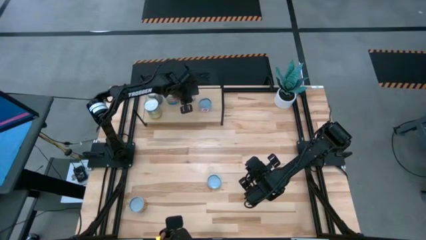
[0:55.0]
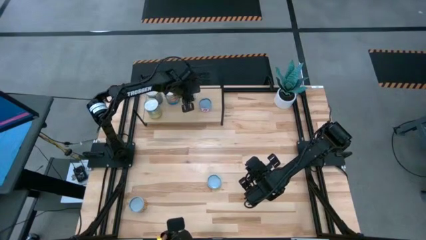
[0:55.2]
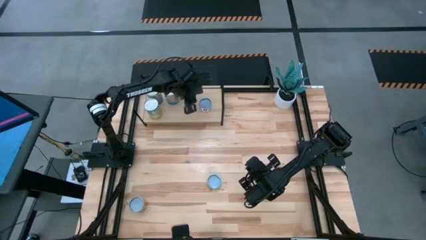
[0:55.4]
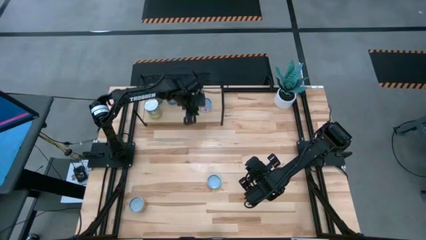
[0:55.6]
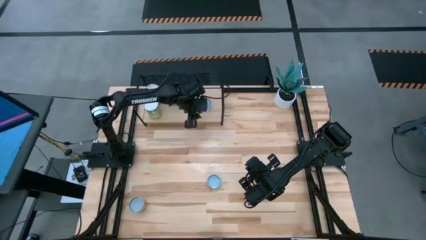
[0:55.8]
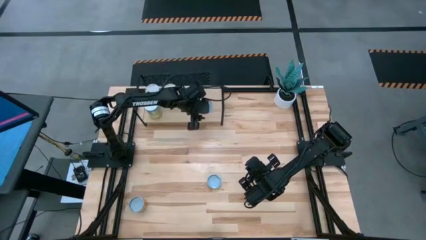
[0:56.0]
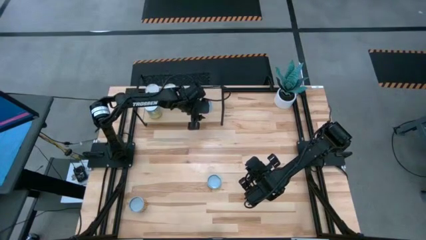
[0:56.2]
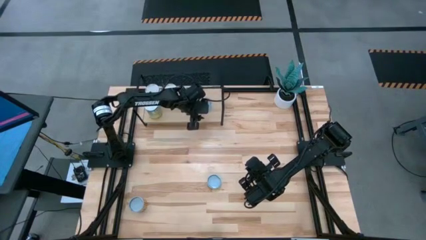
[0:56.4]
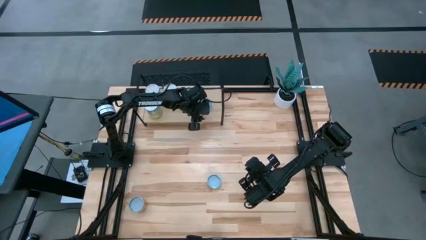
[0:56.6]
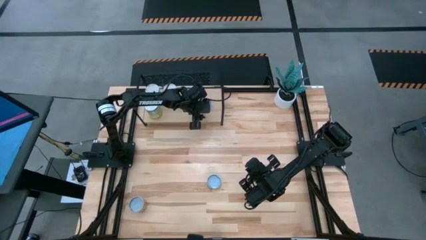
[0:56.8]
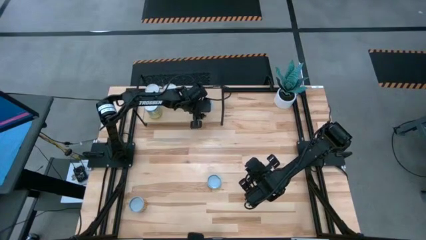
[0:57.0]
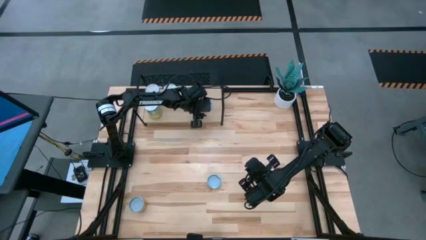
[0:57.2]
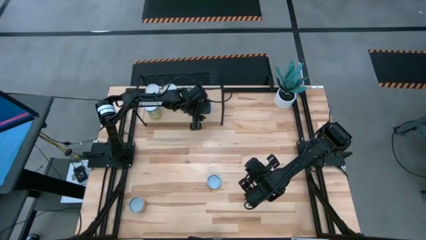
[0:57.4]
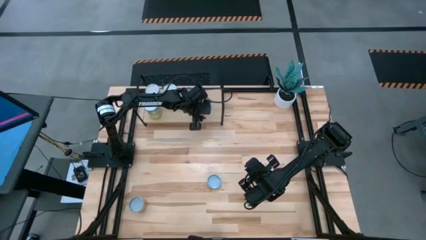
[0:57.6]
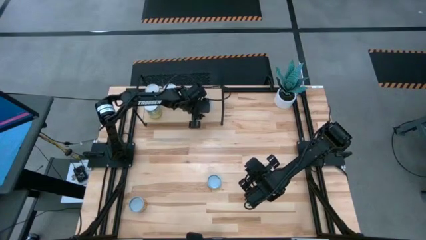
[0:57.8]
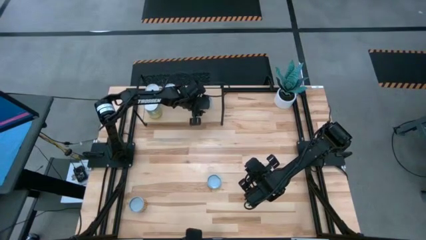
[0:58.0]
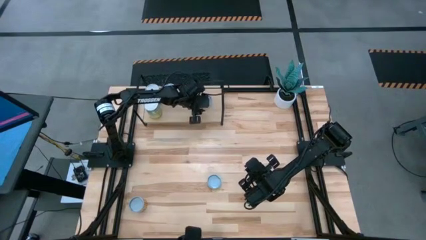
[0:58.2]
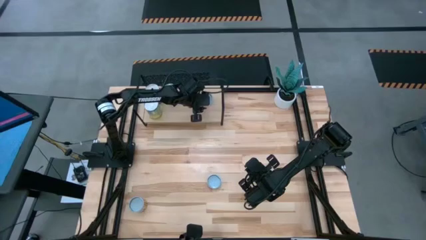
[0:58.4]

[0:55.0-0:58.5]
Task: Pick and place cans onto a shelf
Adjust the tuna can on the shelf

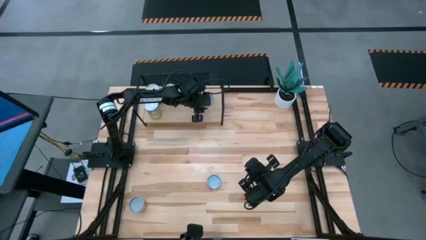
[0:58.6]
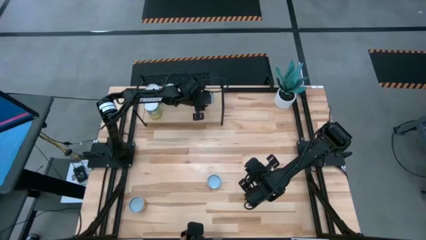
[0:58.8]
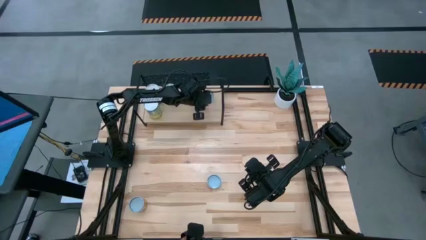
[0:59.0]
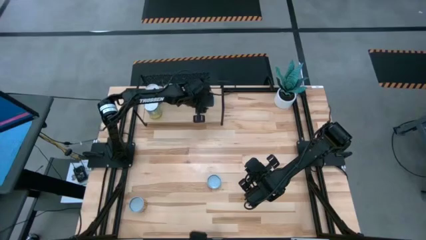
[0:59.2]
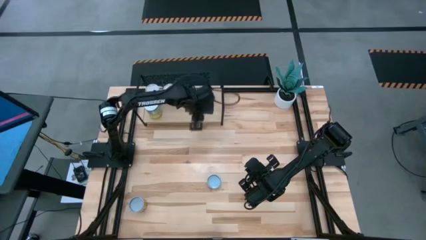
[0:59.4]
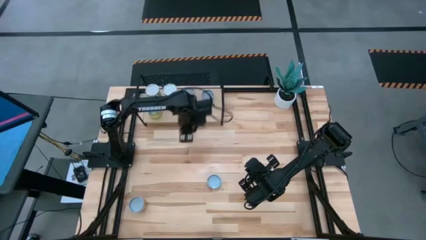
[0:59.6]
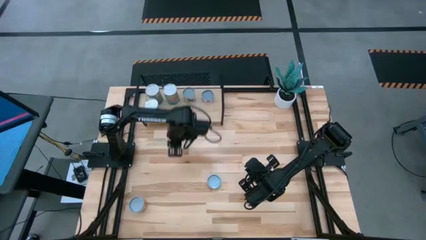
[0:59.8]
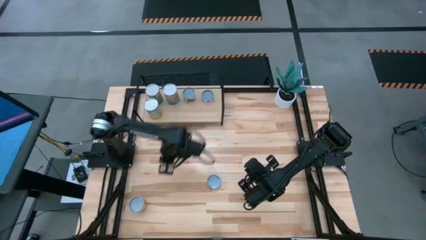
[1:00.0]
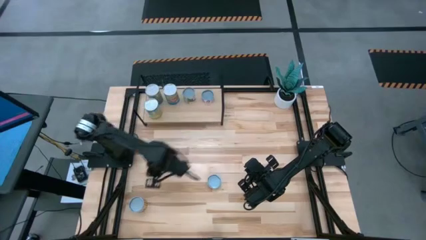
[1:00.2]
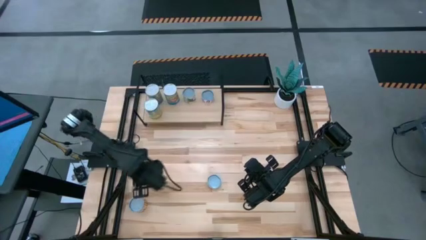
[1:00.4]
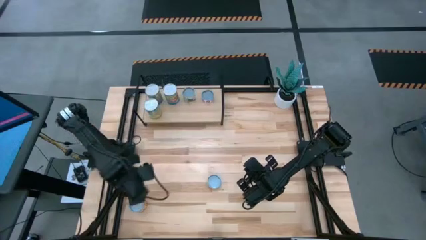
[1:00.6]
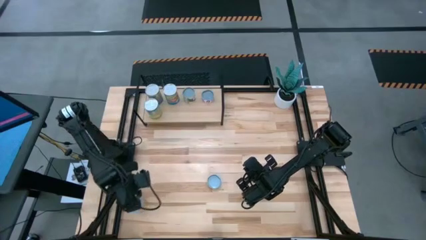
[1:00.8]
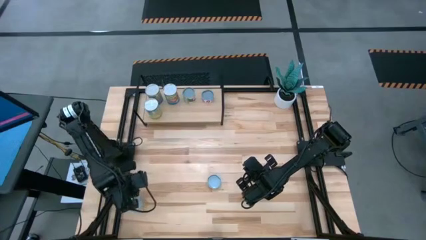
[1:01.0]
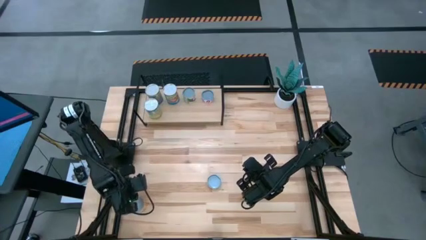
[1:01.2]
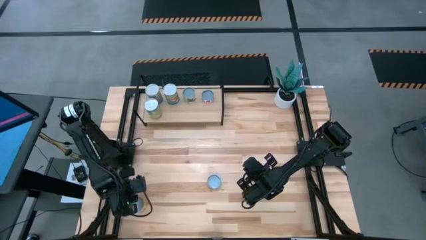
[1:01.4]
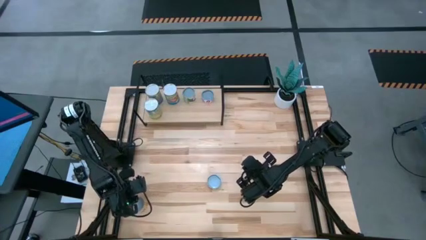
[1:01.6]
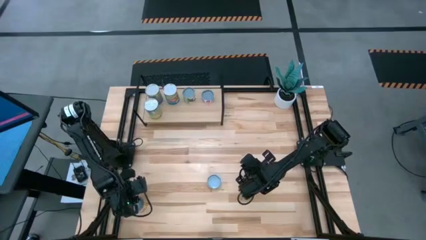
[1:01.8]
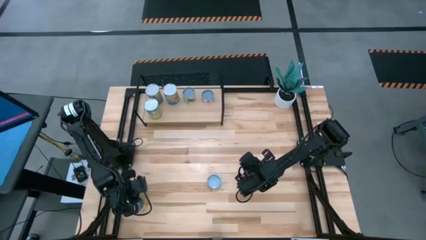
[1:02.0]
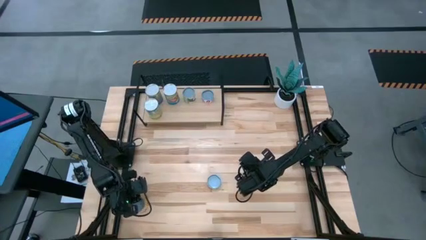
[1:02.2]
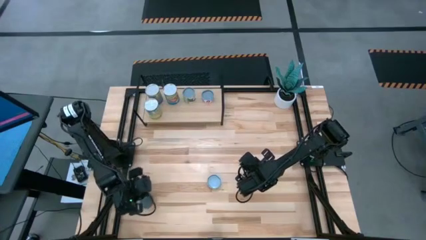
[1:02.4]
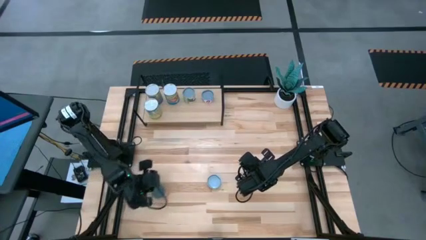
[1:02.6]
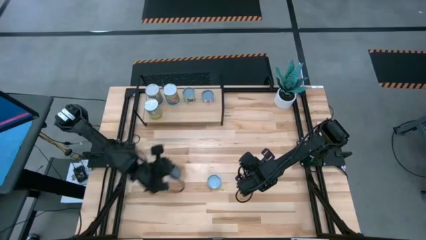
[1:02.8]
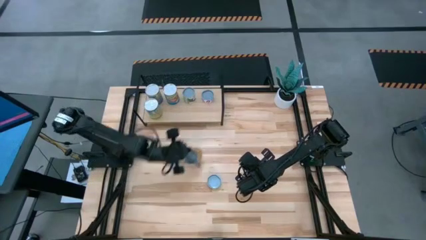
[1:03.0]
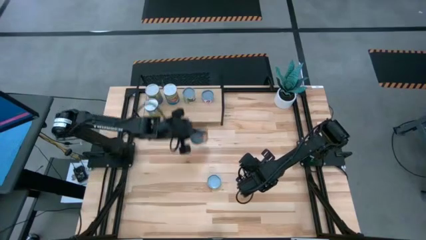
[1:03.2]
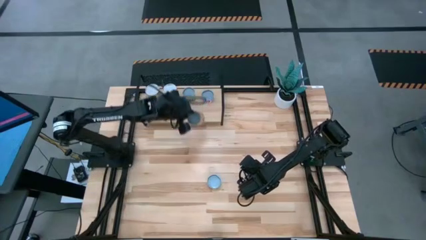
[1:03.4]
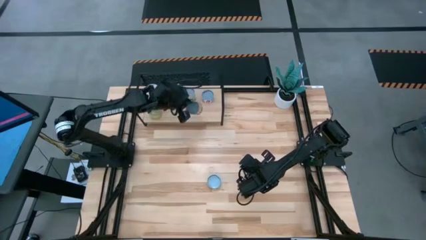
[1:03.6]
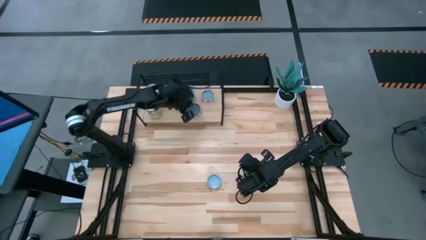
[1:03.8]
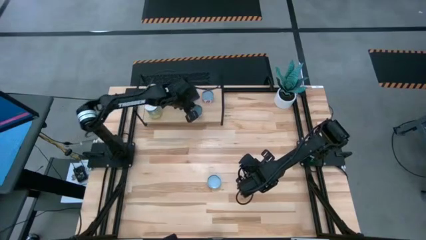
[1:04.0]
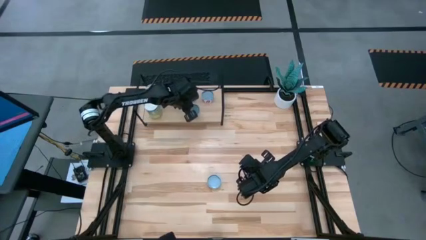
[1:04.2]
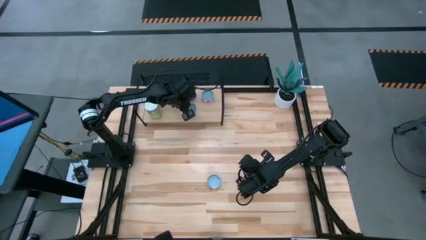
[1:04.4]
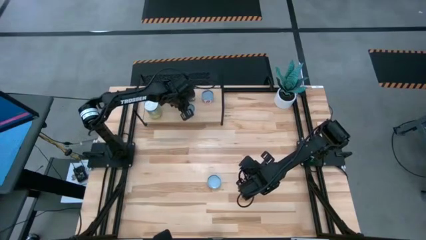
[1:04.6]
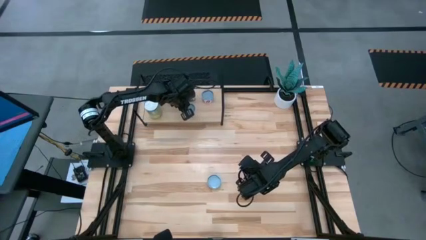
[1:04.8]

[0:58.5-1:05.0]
Put the black beans can on the shelf

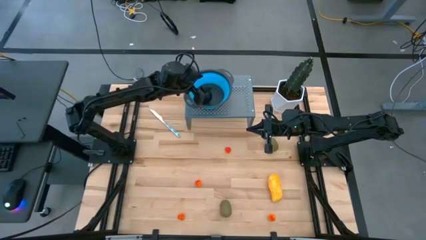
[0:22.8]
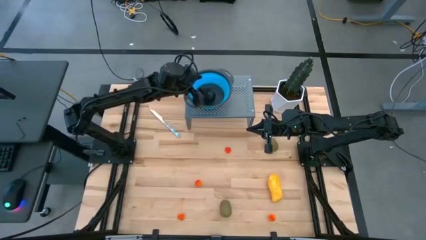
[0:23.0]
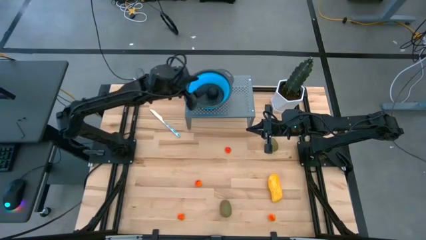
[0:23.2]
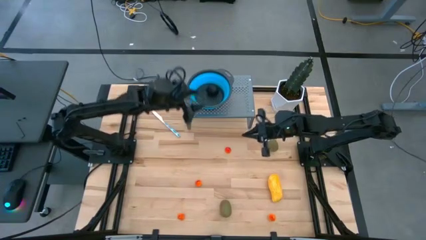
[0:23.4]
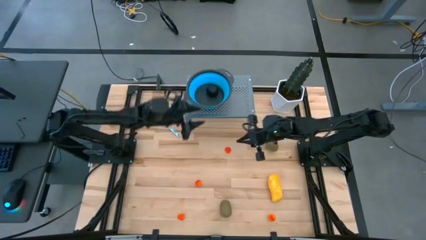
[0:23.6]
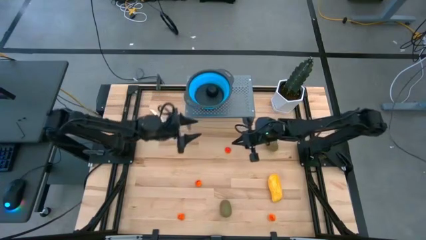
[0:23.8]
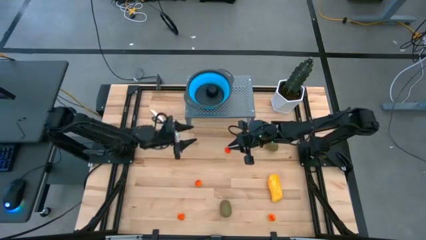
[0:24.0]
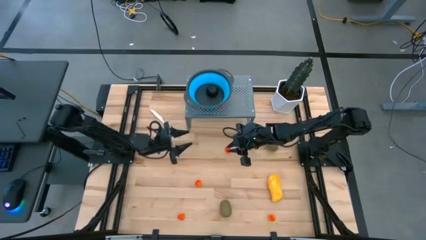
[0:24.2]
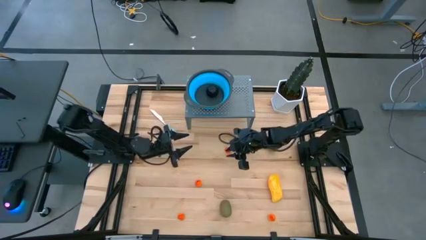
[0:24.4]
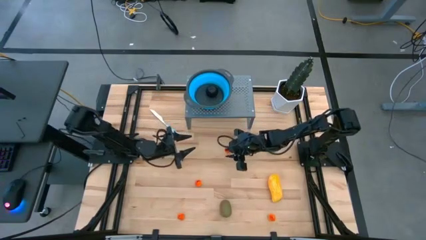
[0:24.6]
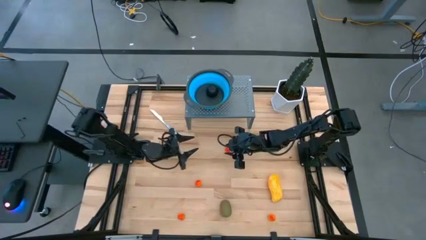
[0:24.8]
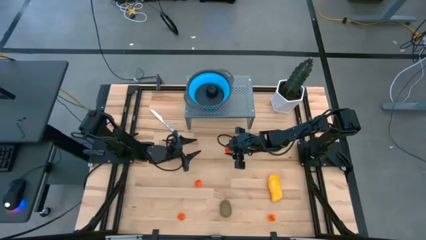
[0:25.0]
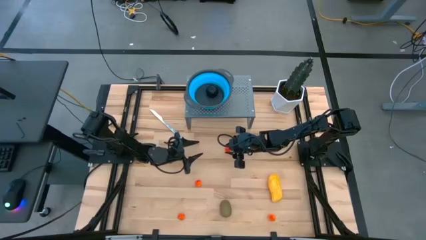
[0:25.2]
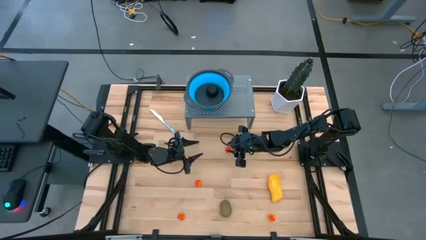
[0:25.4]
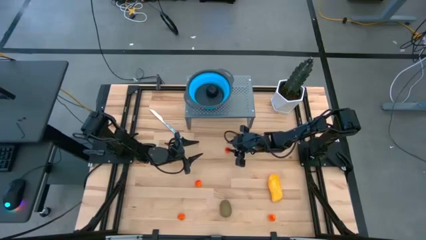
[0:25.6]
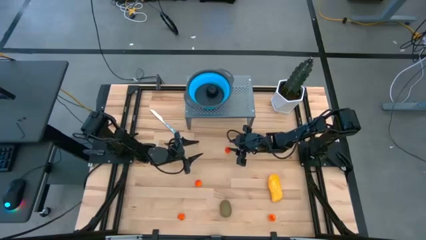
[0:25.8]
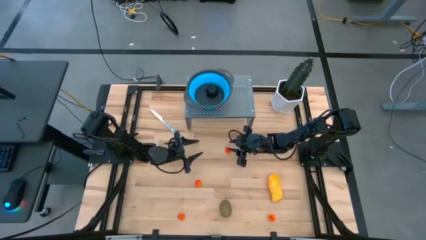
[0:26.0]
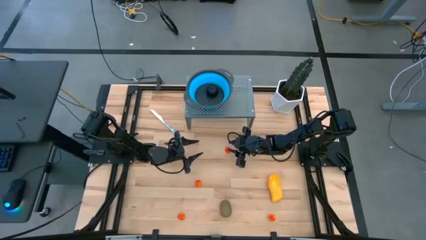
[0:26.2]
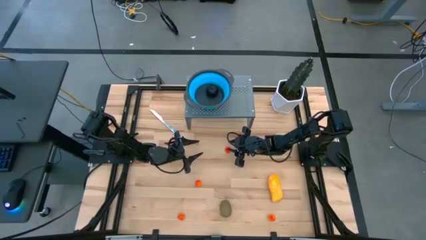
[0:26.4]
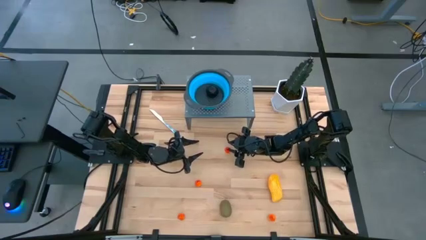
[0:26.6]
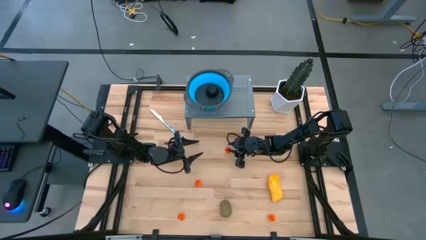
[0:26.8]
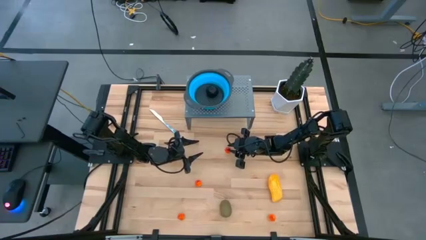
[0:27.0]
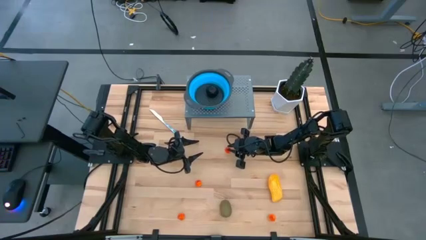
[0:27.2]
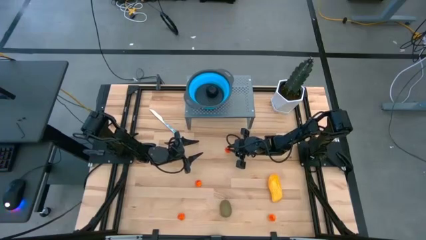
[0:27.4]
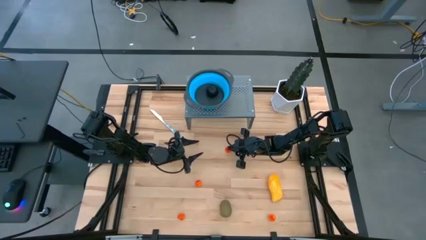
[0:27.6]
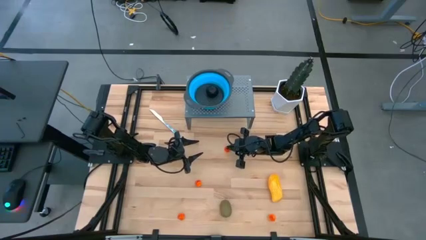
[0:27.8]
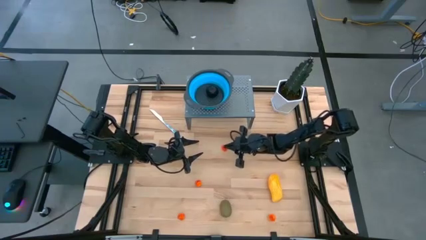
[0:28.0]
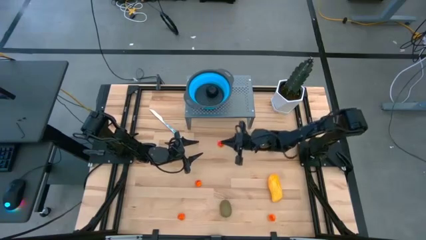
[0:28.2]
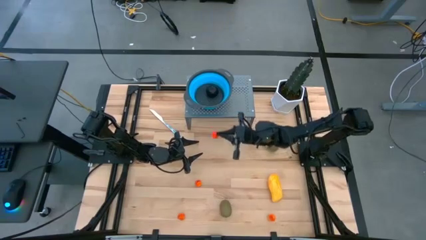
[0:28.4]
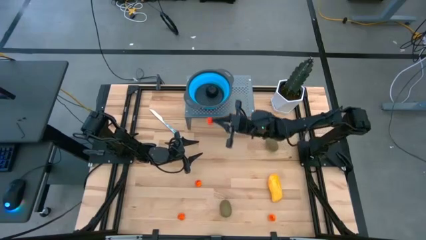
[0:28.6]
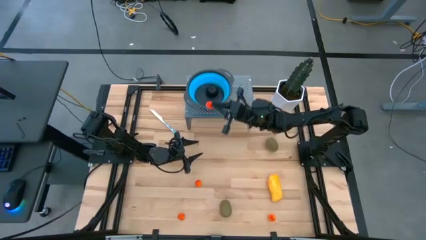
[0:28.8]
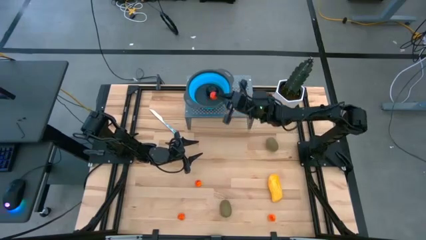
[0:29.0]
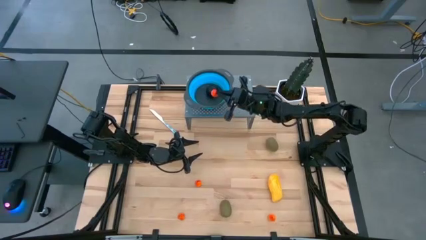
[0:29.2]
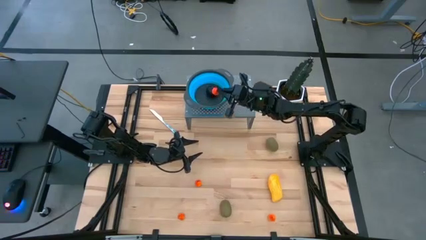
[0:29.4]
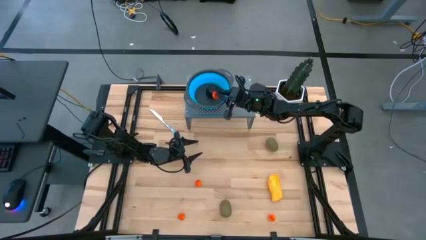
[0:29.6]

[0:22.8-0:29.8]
Task: Pick & Place Fruit
Put the orange pear into the blue strainer bowl
